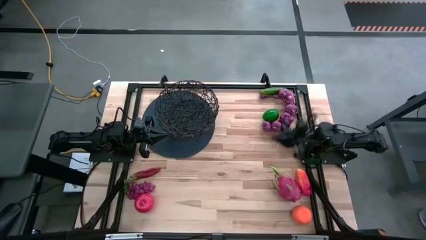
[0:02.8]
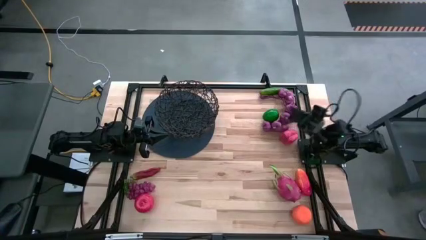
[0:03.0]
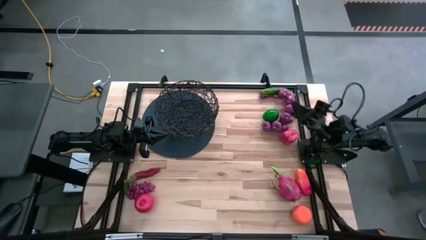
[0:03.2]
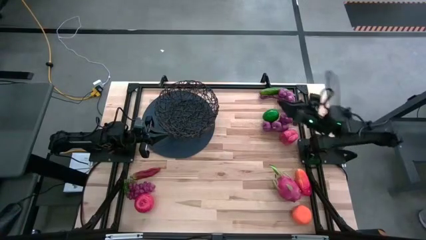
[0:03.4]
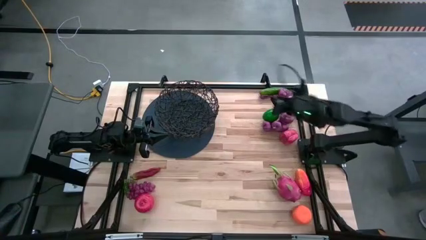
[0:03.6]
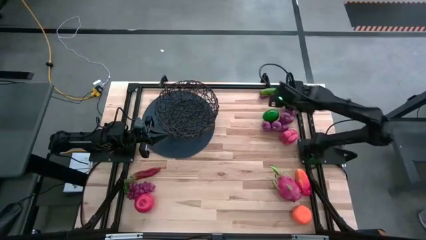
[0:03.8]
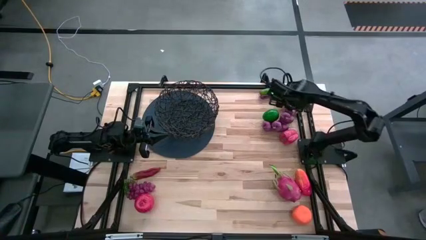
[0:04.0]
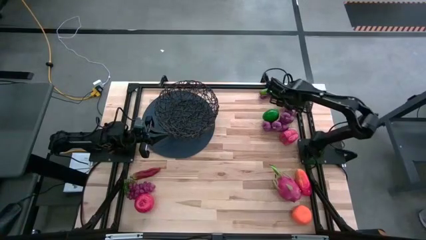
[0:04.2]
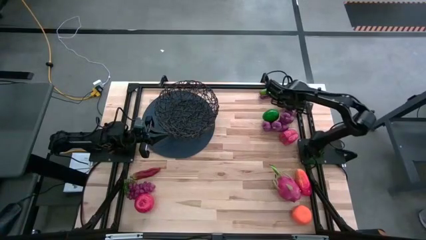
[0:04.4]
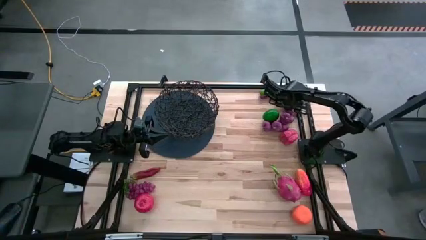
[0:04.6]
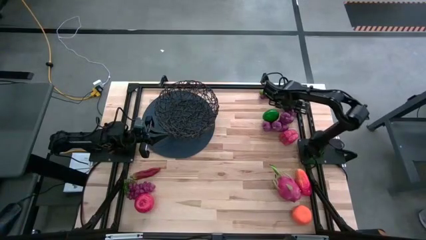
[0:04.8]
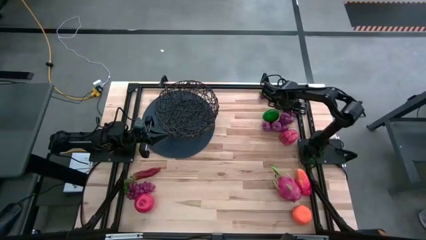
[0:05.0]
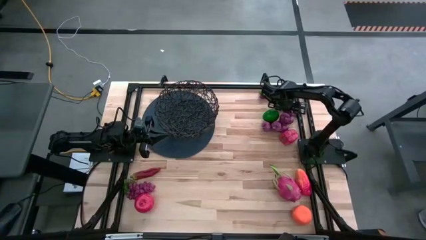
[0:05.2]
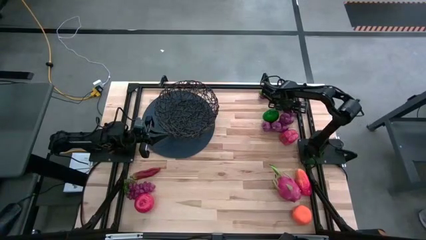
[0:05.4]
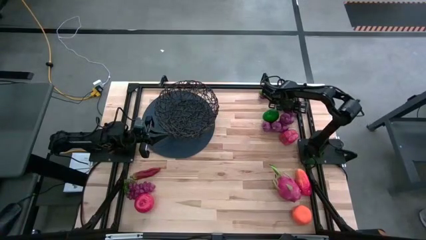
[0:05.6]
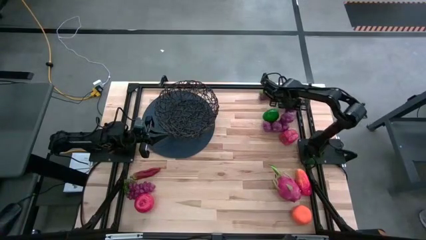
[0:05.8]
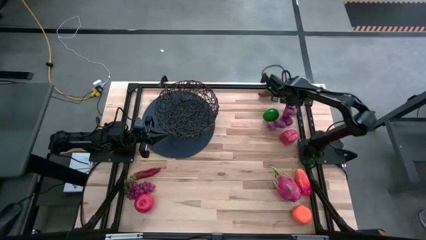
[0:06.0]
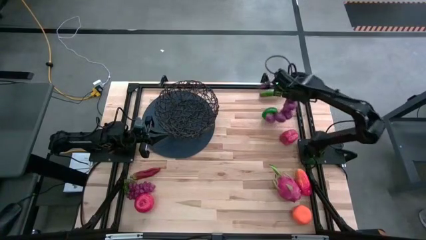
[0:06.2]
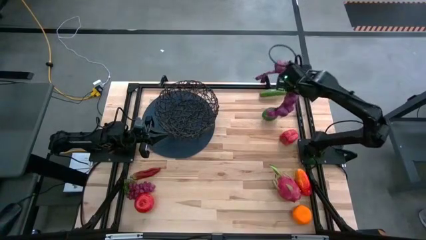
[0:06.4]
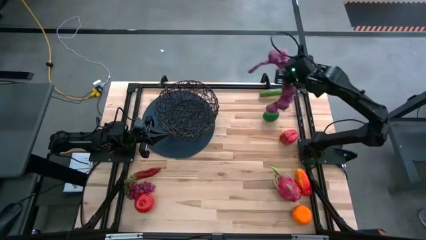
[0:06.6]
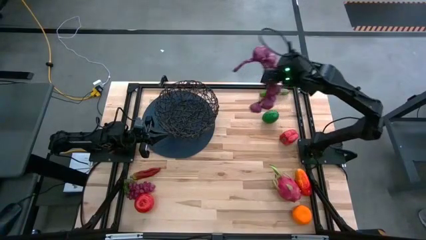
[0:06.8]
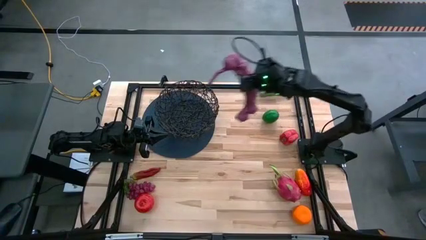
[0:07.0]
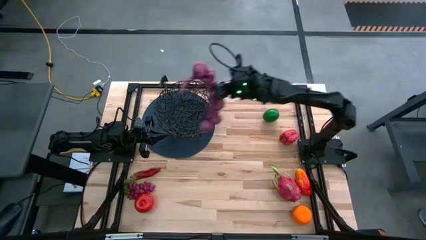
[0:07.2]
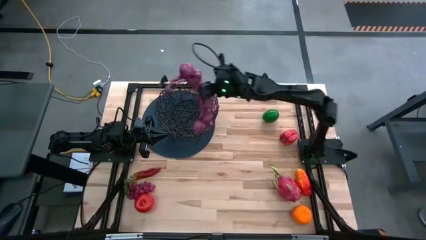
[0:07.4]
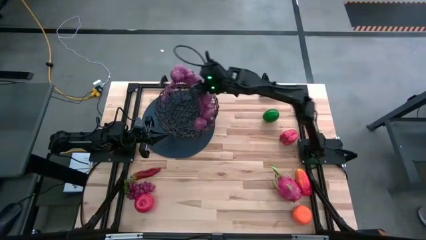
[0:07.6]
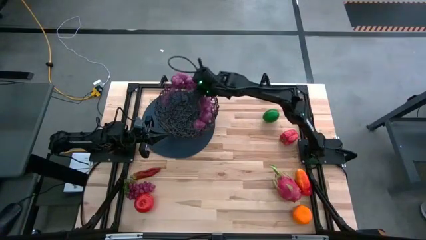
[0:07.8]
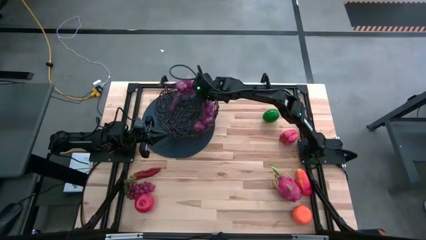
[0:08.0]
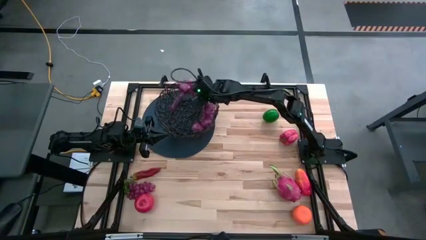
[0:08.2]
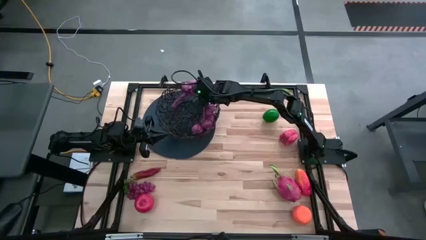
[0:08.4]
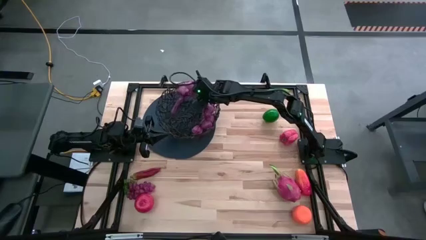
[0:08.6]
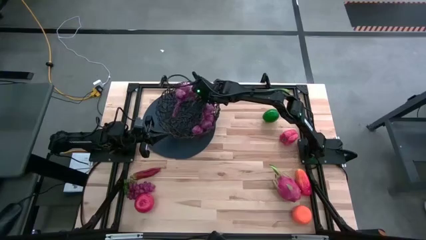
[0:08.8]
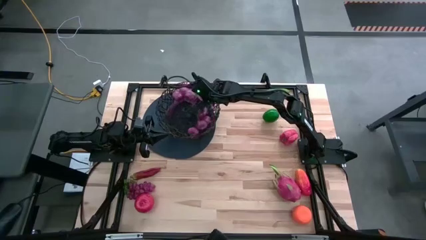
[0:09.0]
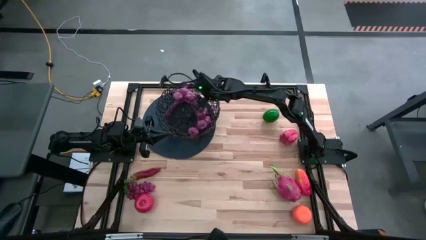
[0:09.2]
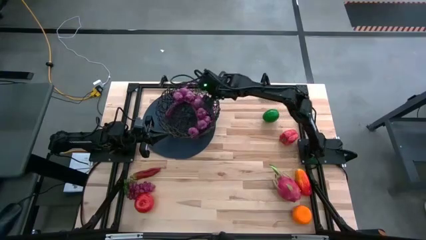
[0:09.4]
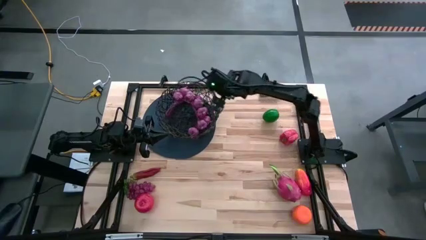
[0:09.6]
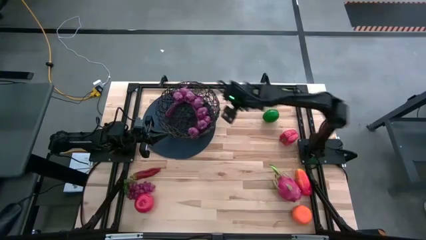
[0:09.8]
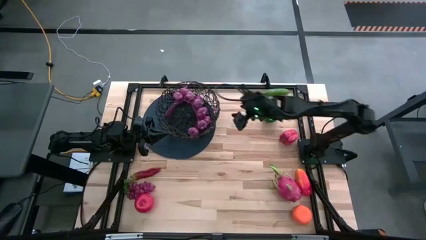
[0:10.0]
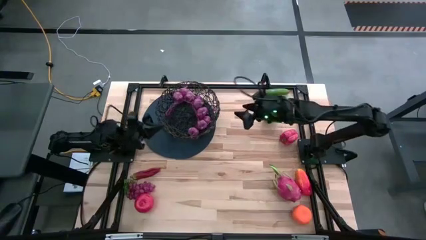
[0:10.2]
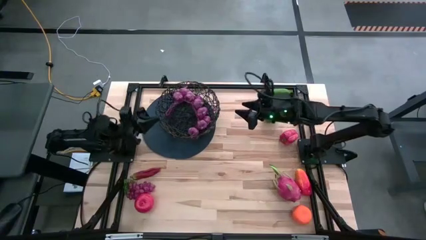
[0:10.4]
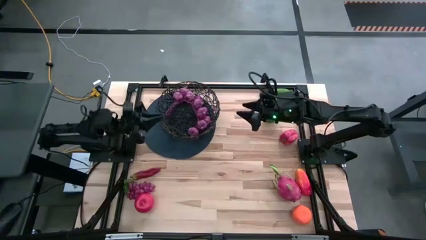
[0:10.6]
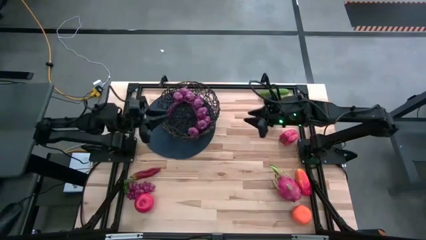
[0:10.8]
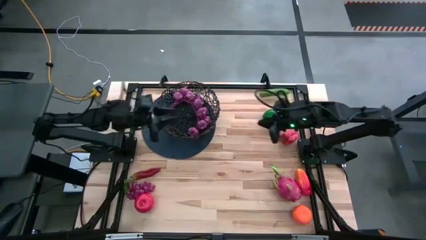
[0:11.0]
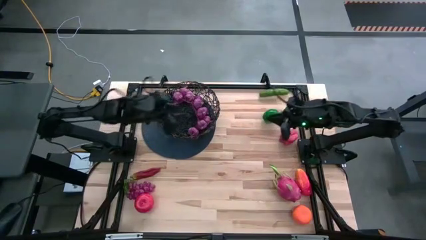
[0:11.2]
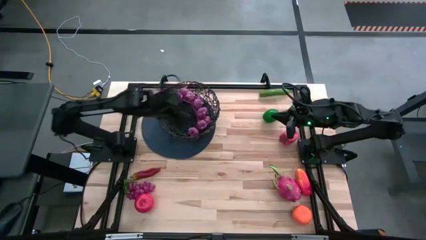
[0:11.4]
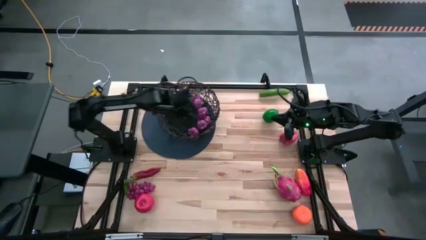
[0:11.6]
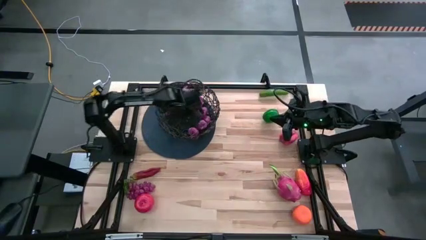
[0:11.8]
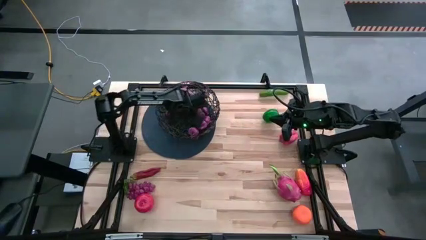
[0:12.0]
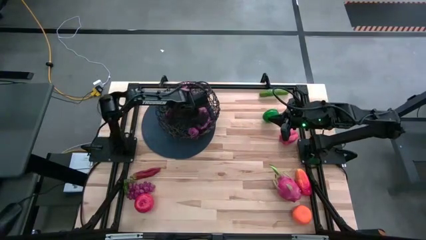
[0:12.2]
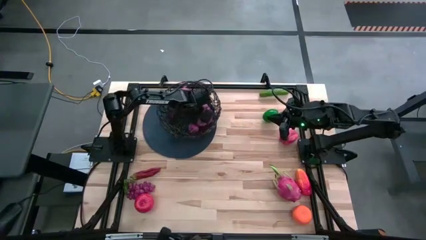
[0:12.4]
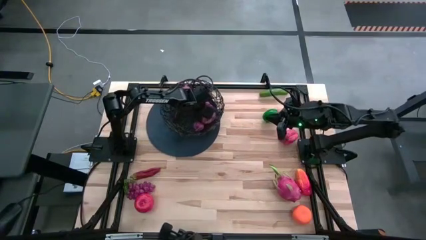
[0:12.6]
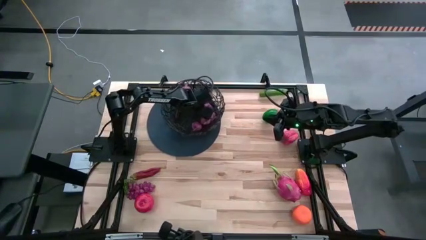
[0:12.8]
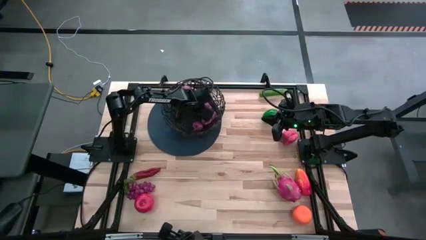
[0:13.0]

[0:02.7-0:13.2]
Task: Build produce basket
Put the purple garlic into the black basket

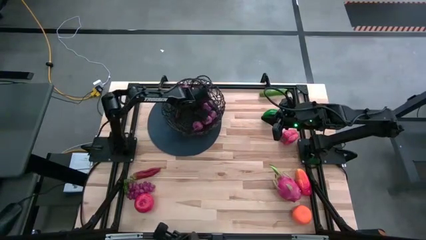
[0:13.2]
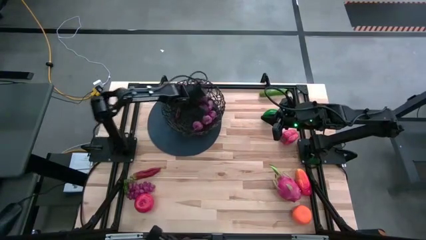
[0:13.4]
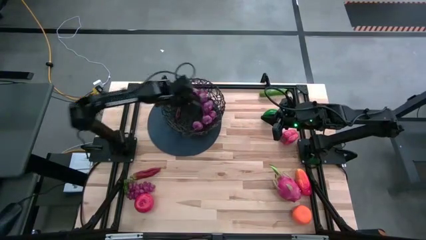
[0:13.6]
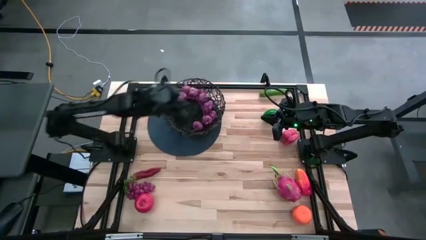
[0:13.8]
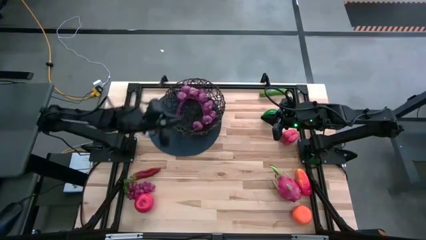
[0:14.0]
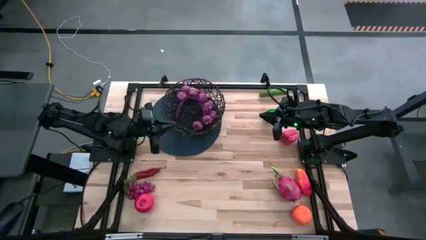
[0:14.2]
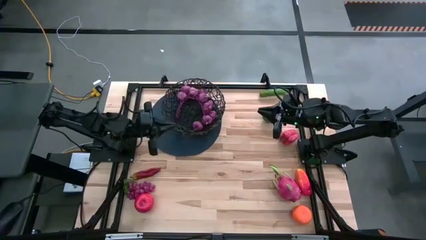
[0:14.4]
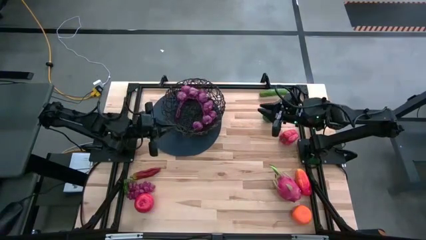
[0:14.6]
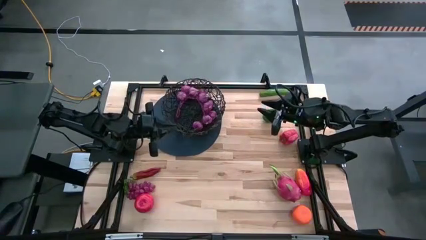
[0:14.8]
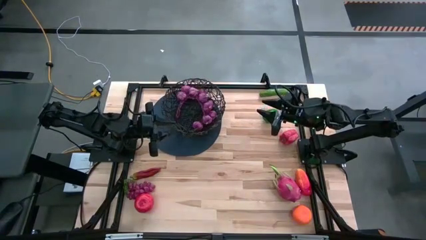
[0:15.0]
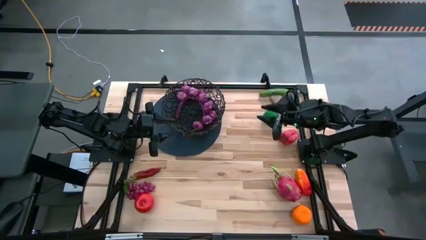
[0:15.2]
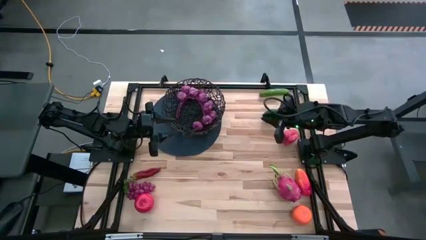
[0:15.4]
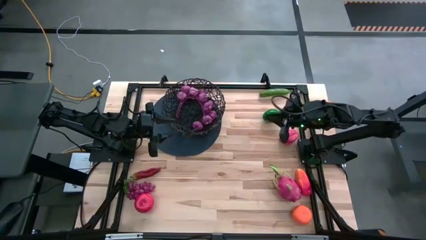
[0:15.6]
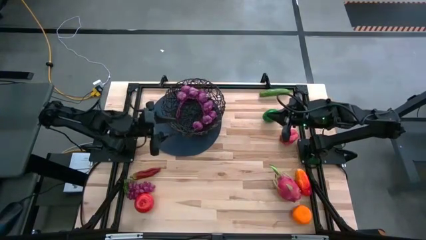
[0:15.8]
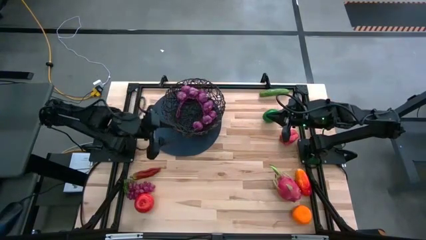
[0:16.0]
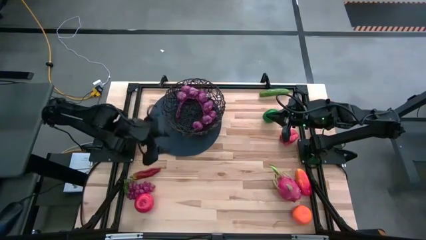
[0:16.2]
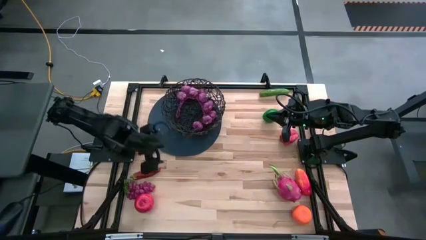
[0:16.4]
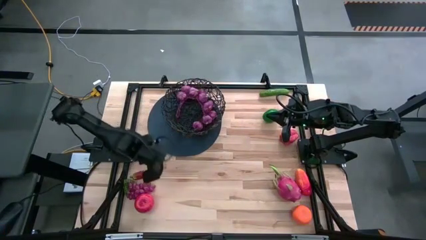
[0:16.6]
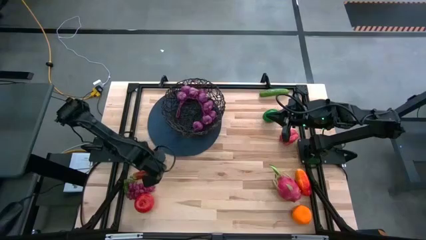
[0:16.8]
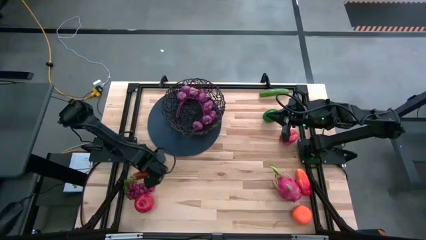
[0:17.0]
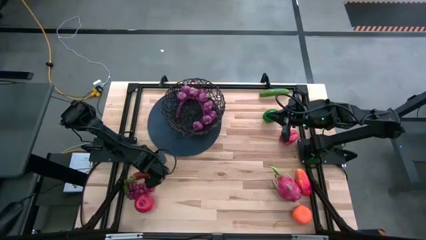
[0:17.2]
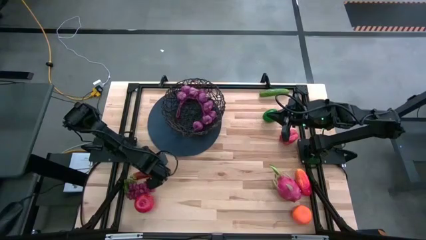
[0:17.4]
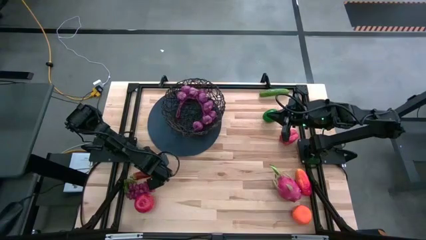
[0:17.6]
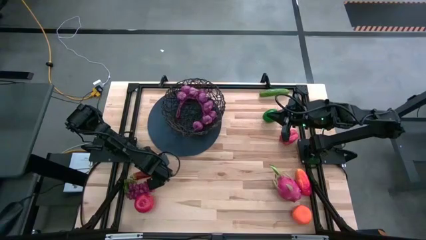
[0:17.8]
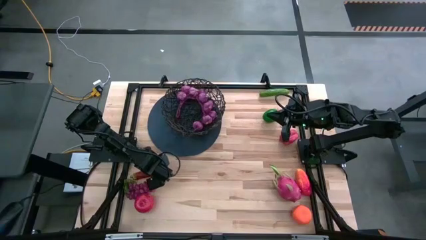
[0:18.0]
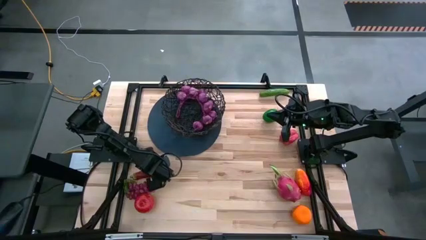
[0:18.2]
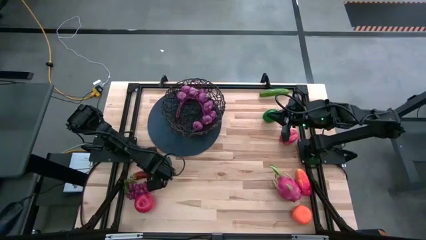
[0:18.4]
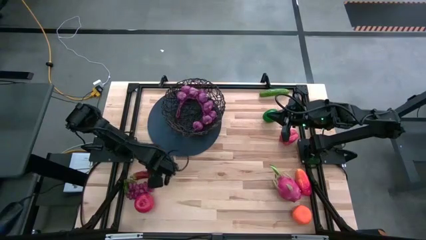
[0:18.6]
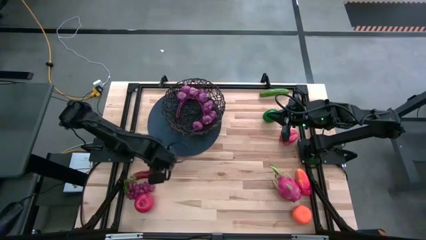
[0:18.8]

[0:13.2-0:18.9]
Put the red chili pepper into the black basket
